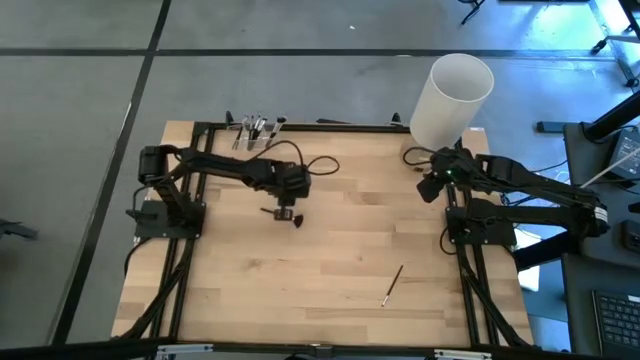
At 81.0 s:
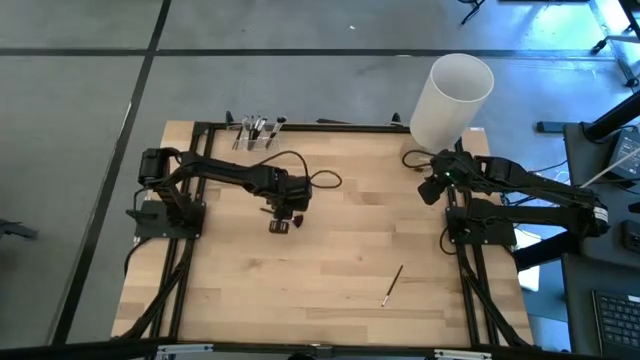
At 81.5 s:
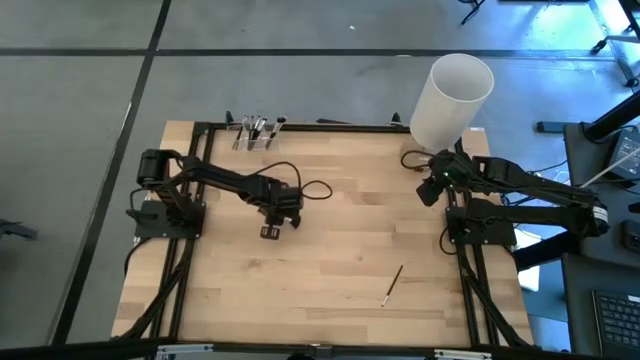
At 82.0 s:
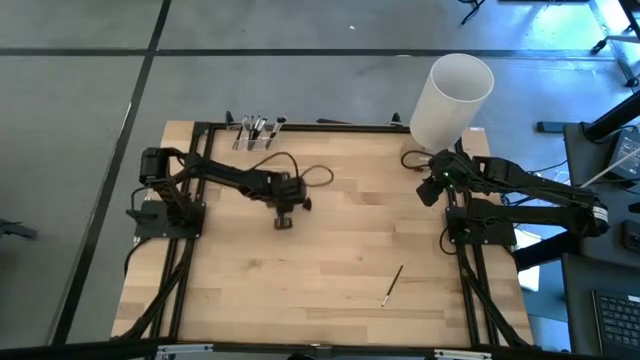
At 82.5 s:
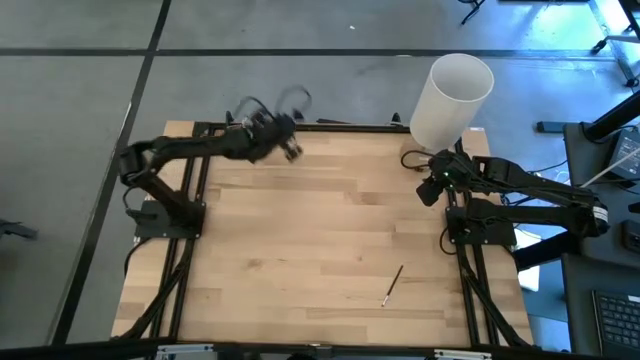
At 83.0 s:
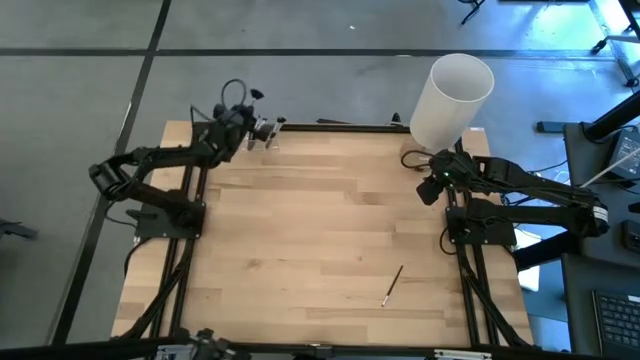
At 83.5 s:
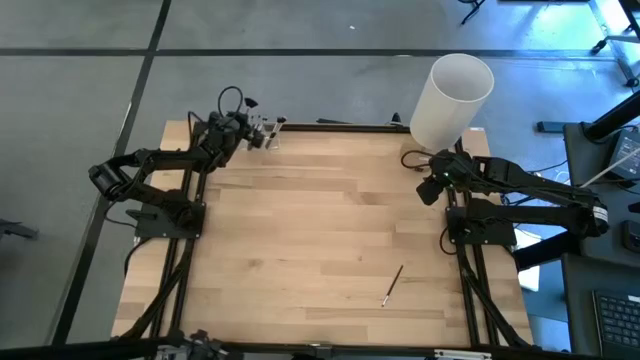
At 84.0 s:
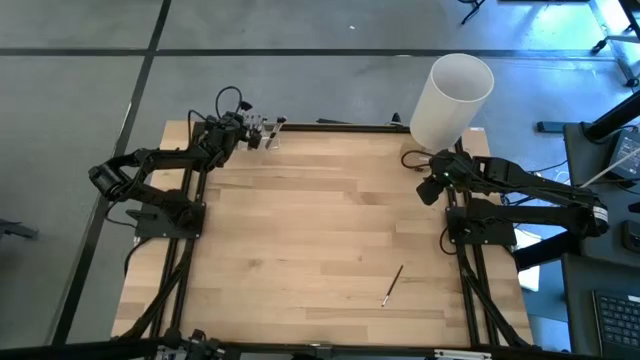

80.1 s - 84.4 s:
Task: Put items in baskets/containers
Put the black highlighter brush into the transparent organizer

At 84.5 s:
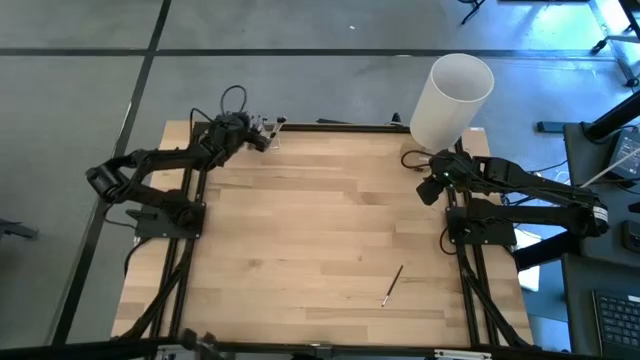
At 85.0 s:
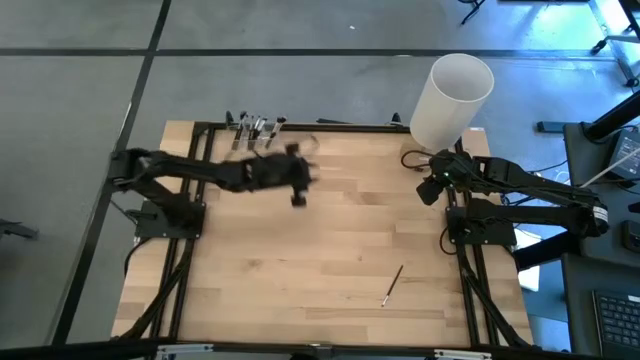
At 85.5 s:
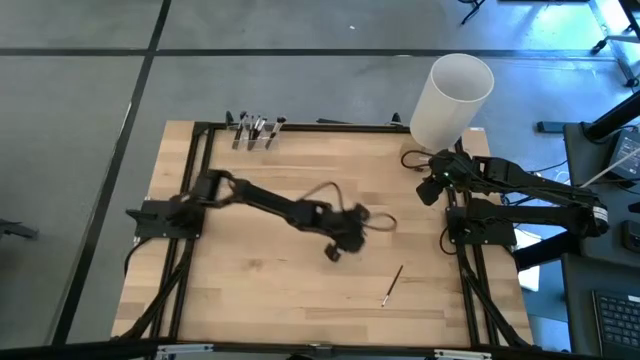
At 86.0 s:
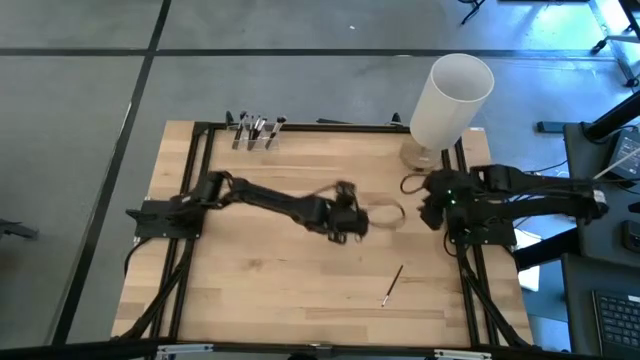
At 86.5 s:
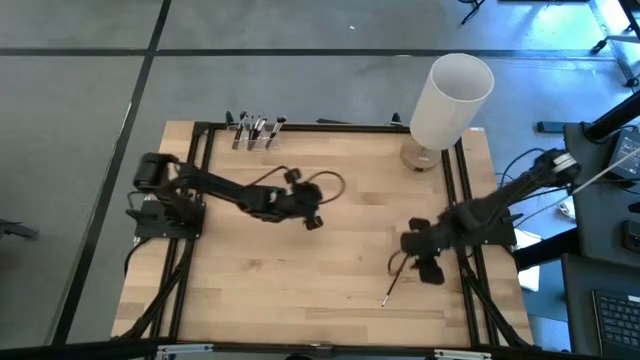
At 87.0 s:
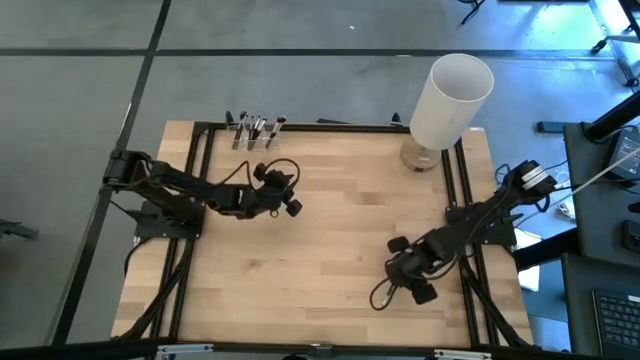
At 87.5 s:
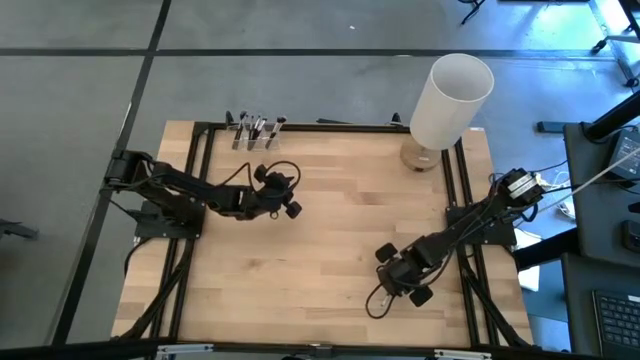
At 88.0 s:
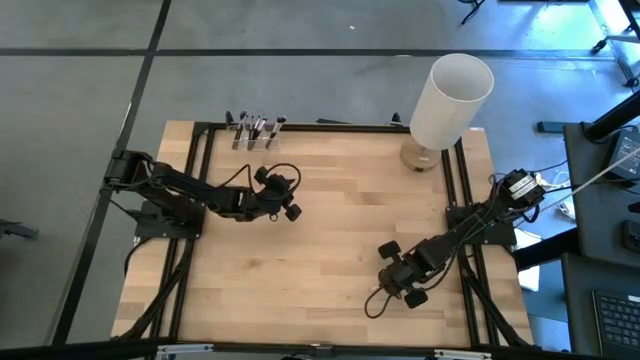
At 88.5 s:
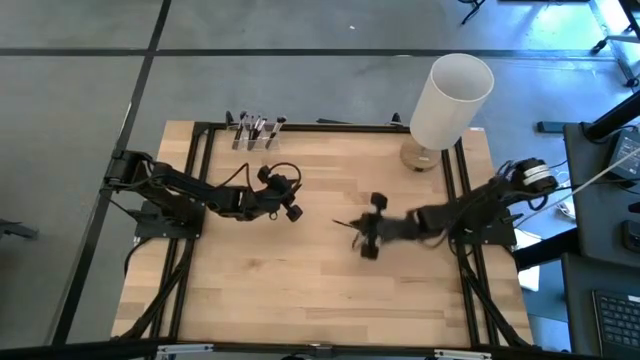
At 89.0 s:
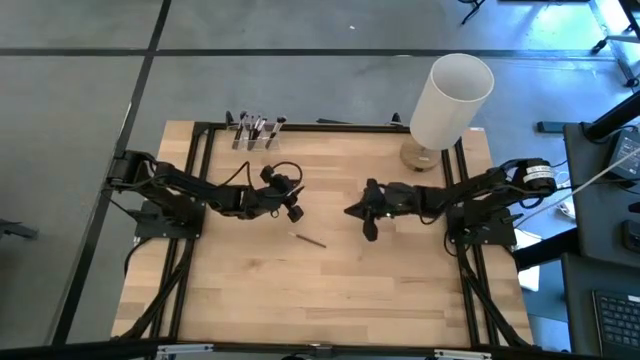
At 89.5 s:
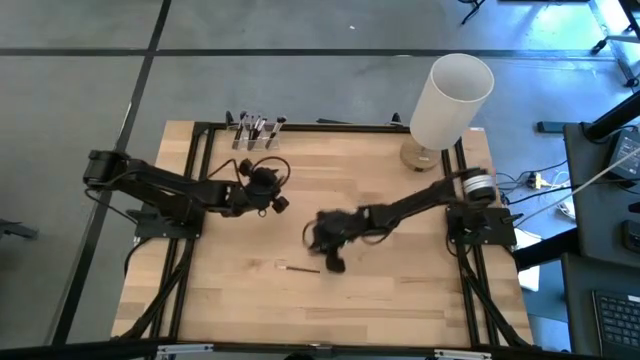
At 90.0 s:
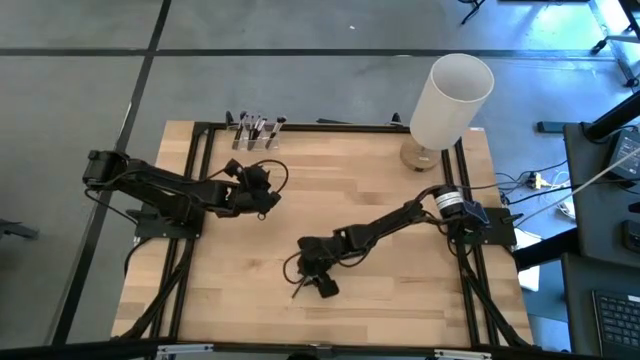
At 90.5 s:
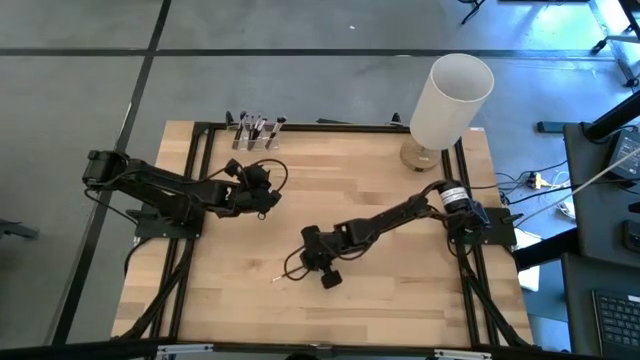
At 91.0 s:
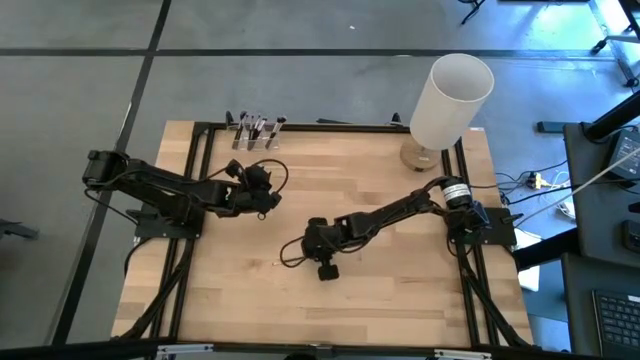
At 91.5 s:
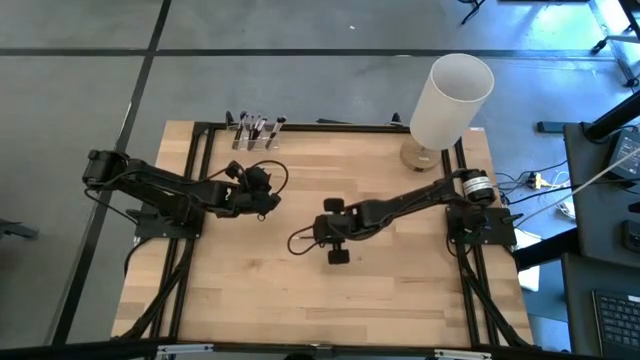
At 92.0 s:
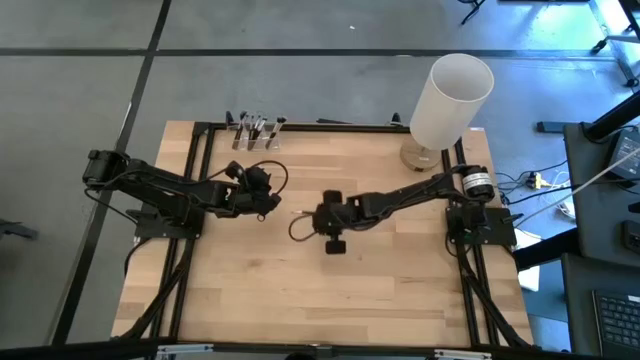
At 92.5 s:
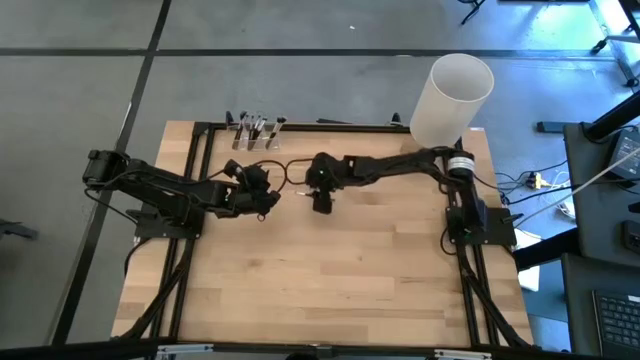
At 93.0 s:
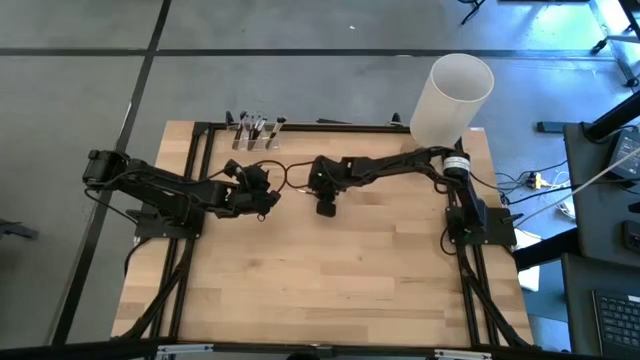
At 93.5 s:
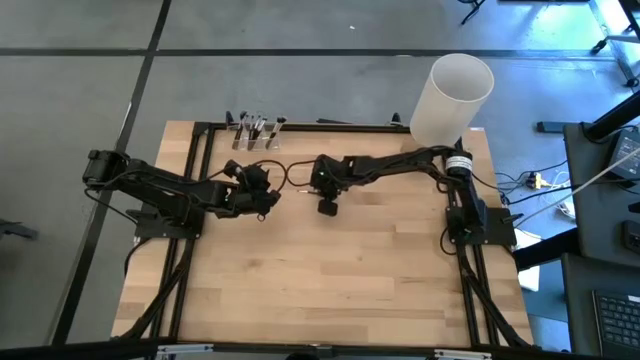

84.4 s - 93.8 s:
Put the black eyeshadow brush into the transparent organizer

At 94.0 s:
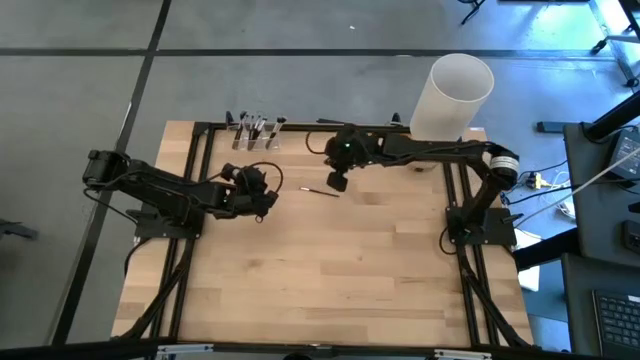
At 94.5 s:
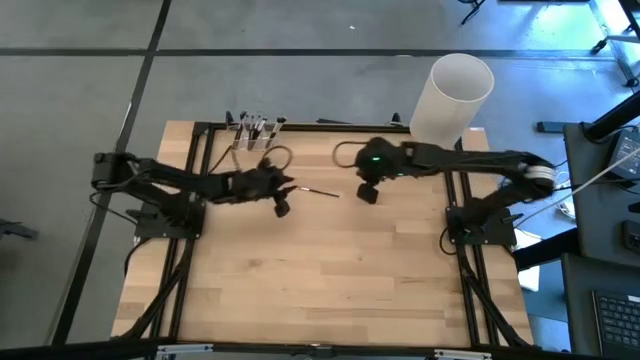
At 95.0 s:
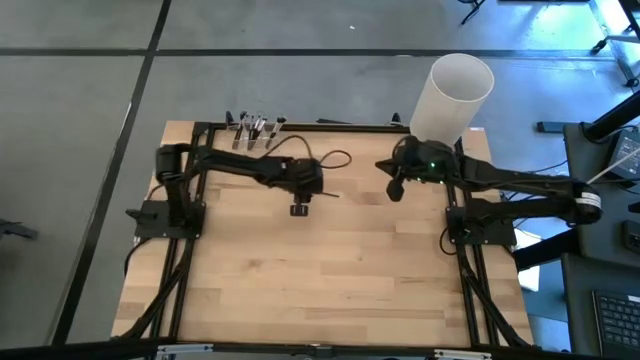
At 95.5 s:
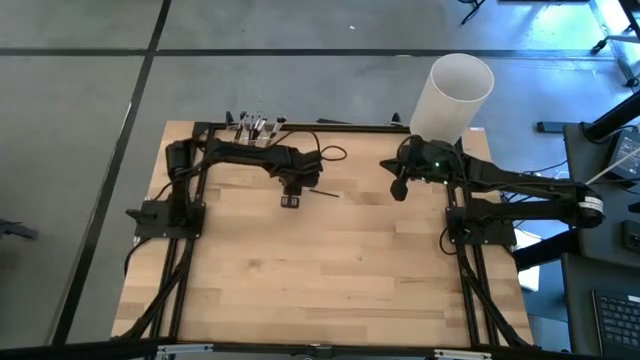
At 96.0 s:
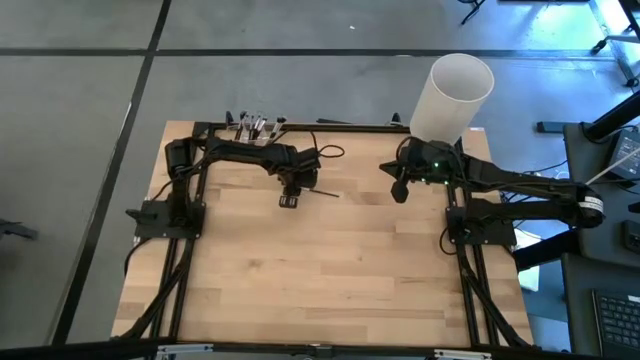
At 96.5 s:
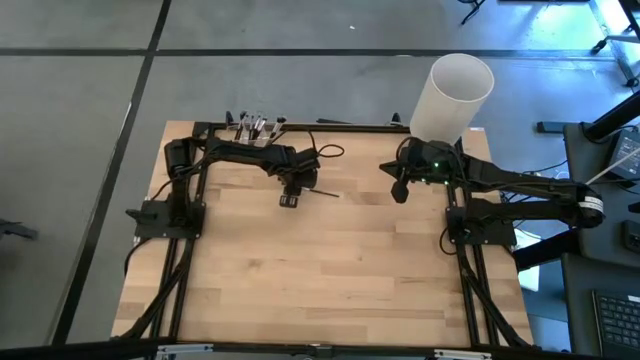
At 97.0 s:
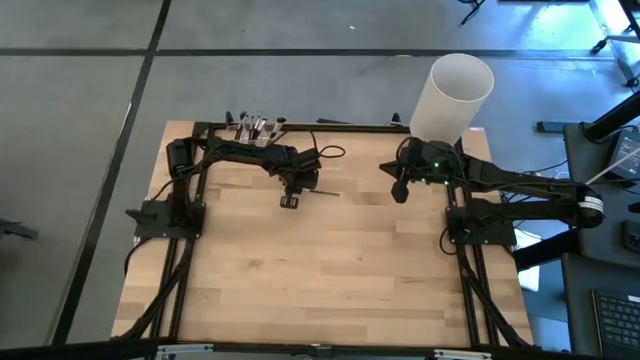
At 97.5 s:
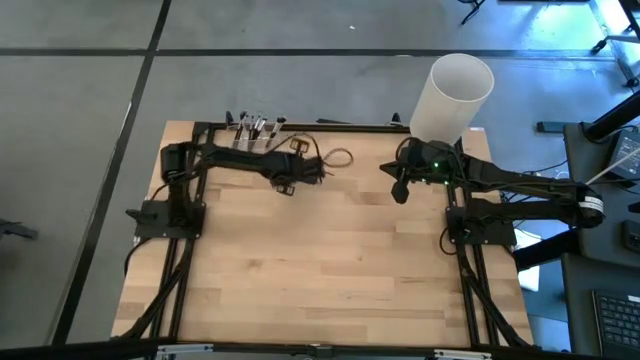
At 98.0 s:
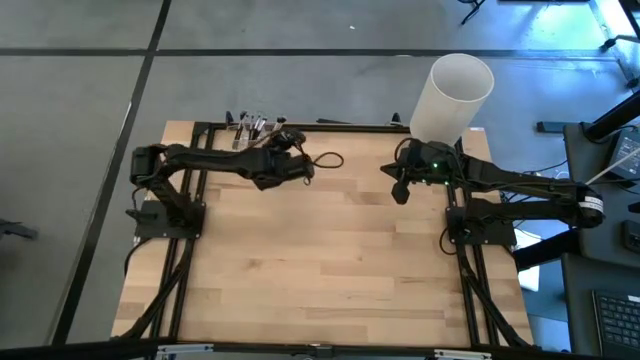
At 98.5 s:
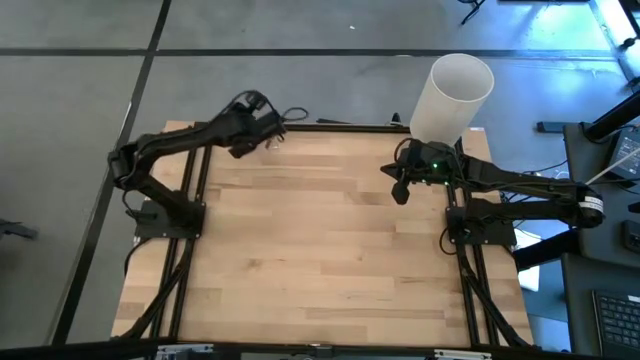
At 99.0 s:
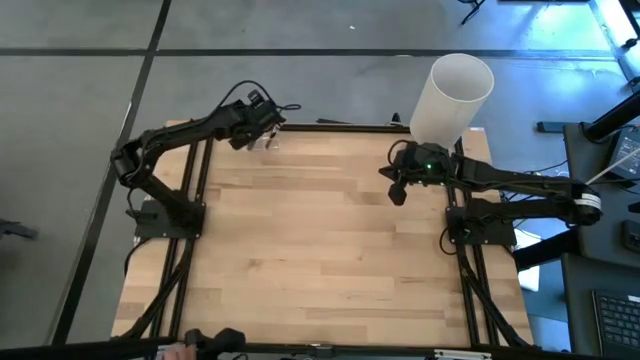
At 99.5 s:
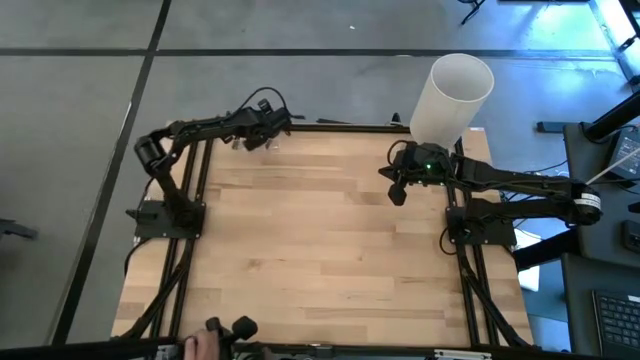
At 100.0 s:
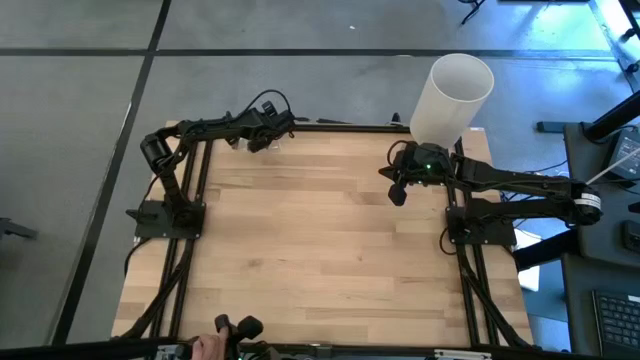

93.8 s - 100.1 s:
Put the black eyeshadow brush into the transparent organizer

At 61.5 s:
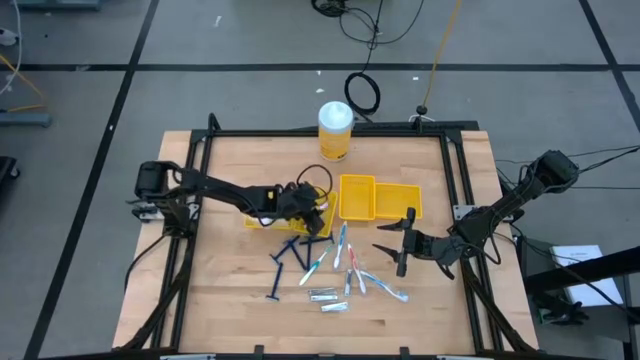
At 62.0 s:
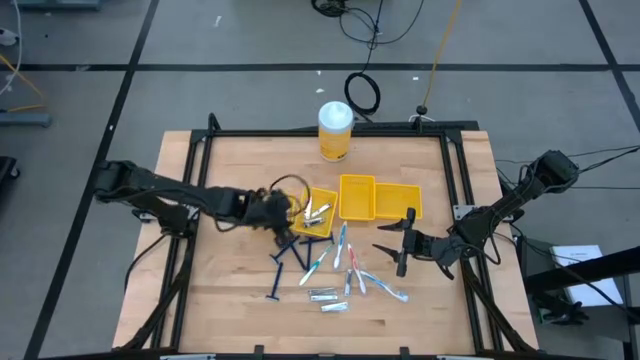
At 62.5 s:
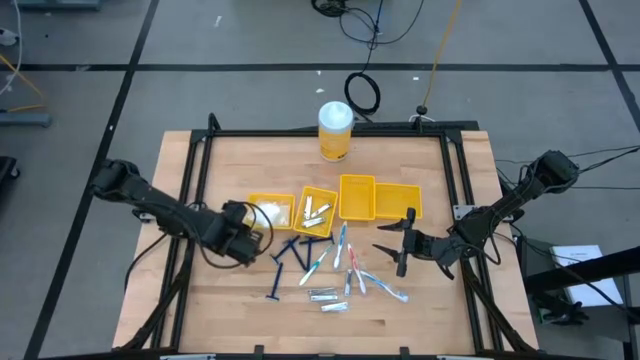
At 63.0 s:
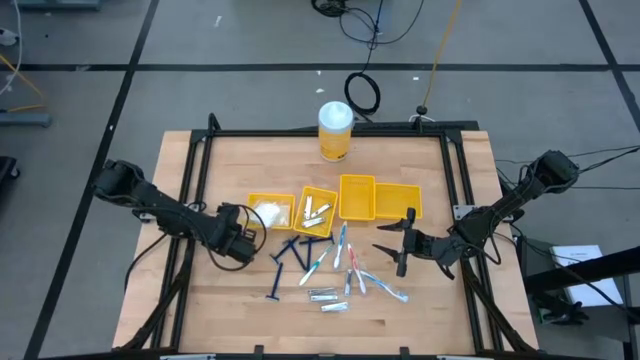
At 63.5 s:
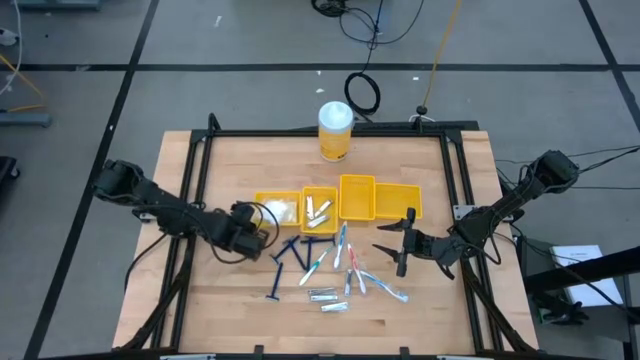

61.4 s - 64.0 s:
Task: Pick & Place Travel size toiletries
Adjust the left yellow bin on the table
